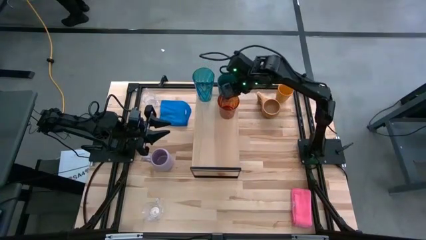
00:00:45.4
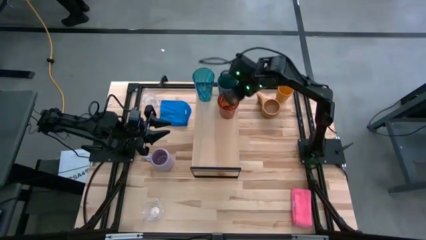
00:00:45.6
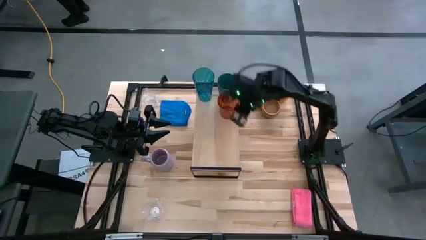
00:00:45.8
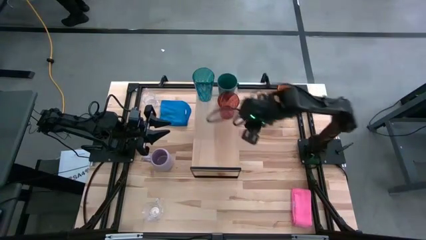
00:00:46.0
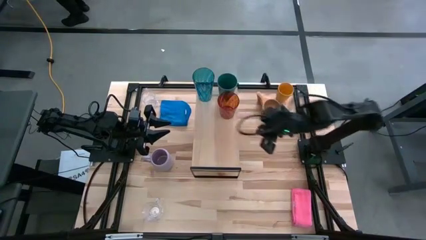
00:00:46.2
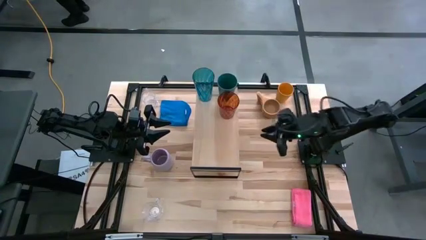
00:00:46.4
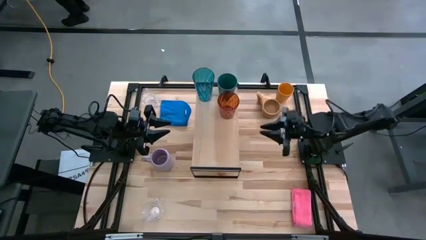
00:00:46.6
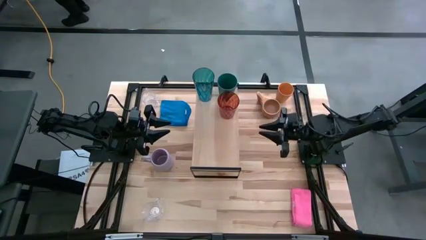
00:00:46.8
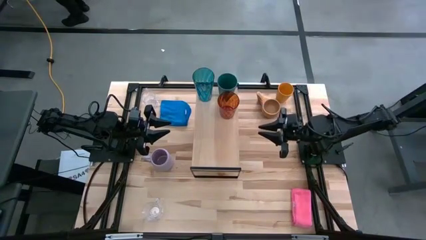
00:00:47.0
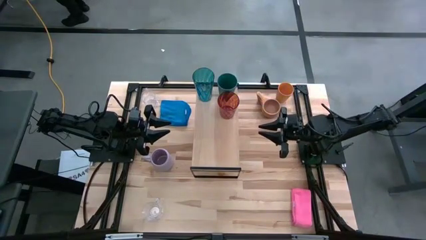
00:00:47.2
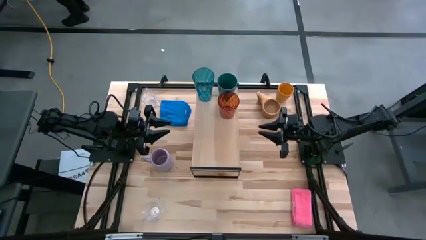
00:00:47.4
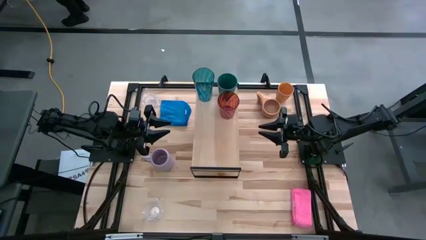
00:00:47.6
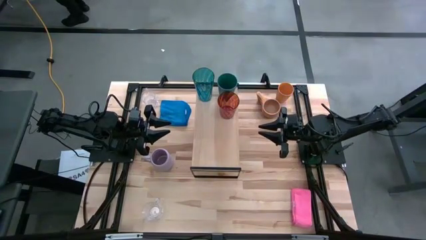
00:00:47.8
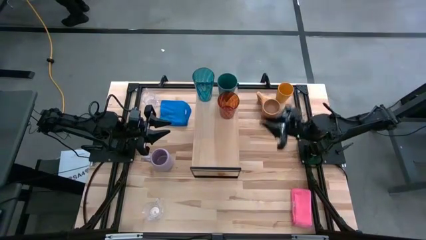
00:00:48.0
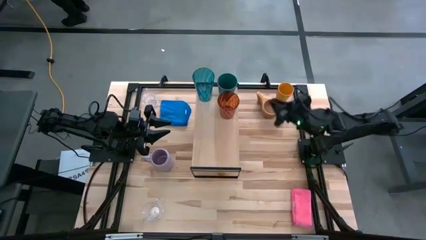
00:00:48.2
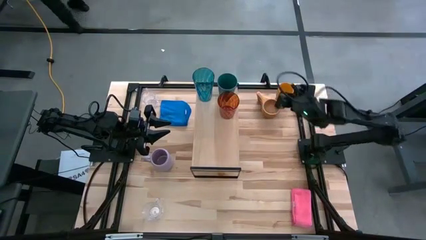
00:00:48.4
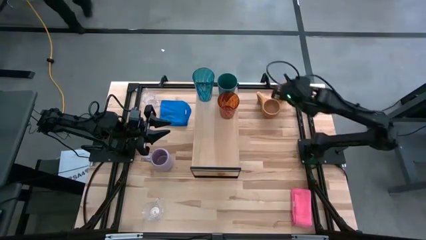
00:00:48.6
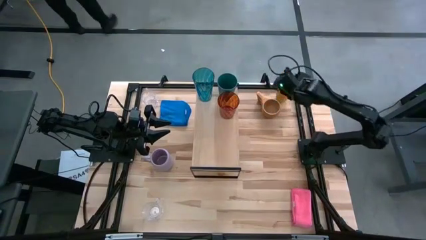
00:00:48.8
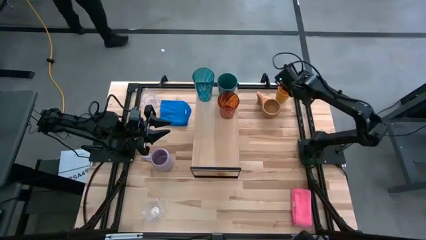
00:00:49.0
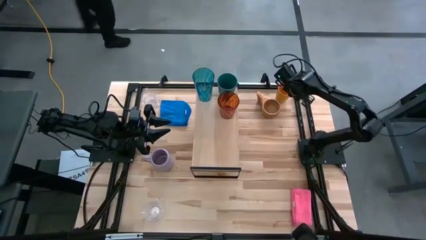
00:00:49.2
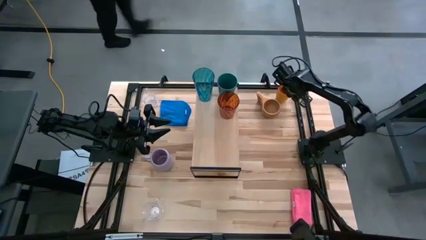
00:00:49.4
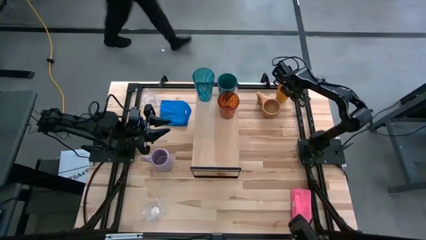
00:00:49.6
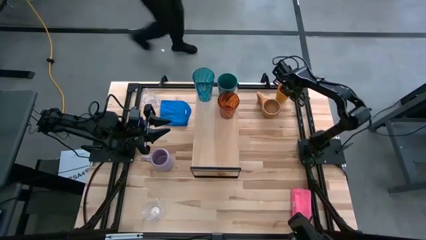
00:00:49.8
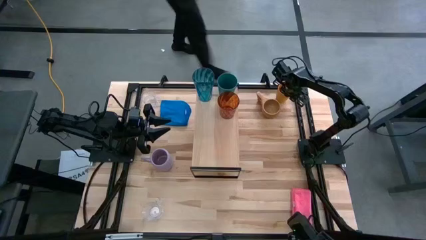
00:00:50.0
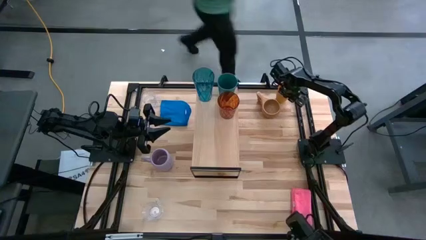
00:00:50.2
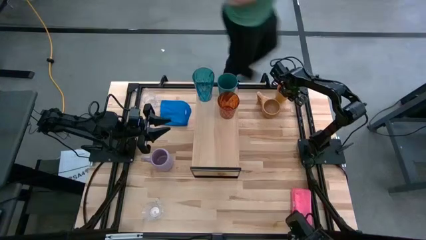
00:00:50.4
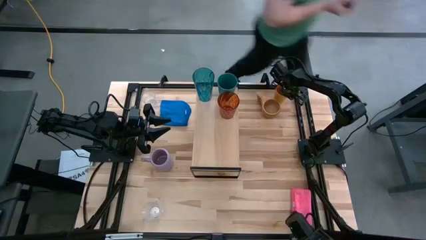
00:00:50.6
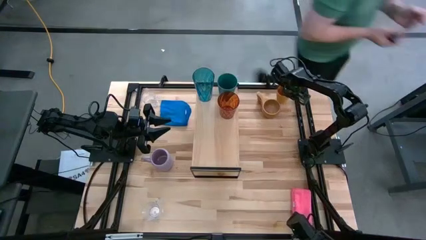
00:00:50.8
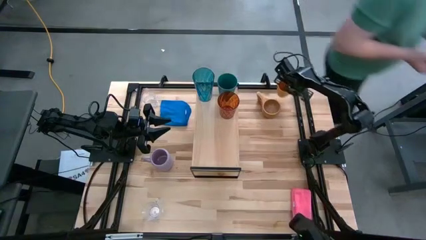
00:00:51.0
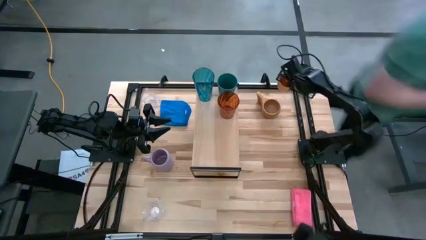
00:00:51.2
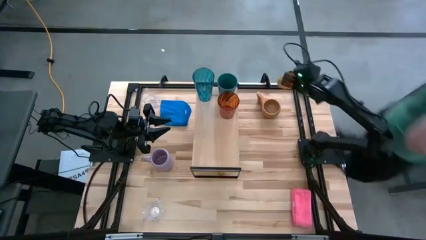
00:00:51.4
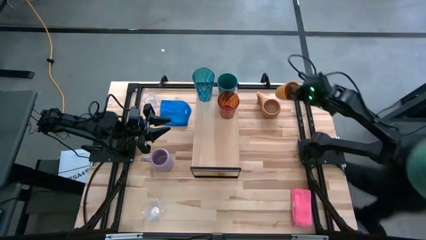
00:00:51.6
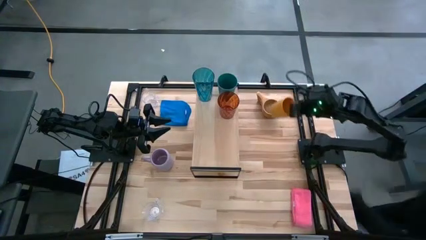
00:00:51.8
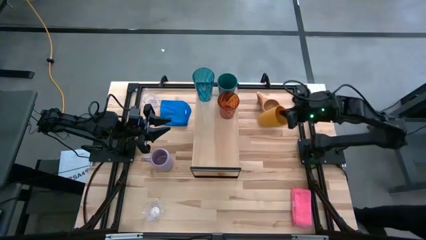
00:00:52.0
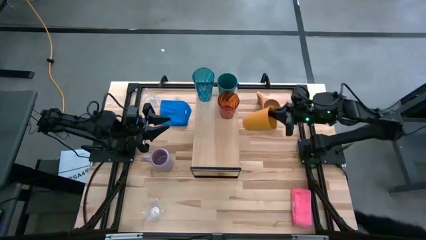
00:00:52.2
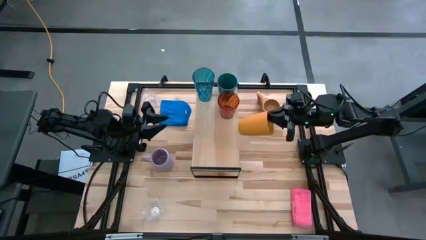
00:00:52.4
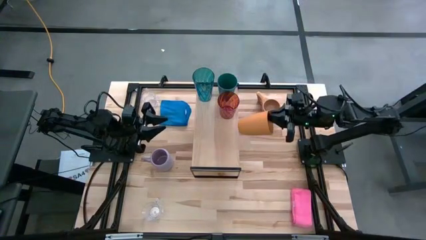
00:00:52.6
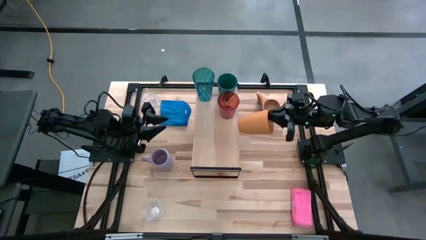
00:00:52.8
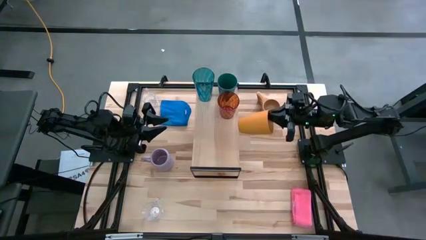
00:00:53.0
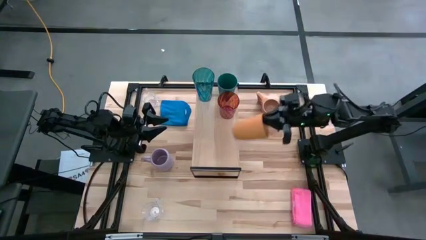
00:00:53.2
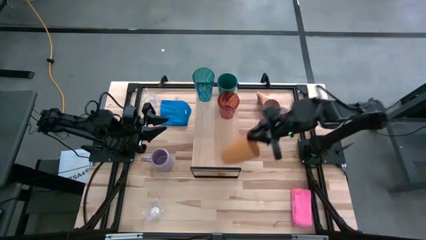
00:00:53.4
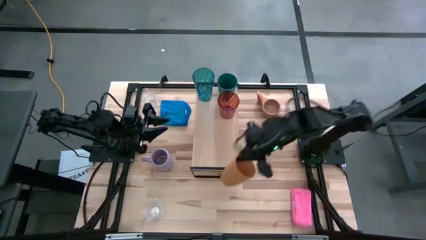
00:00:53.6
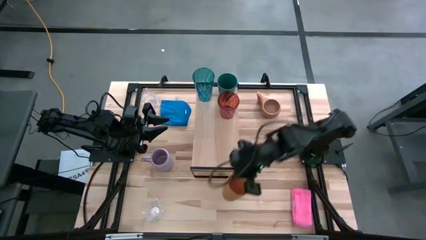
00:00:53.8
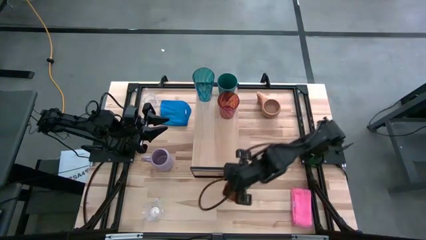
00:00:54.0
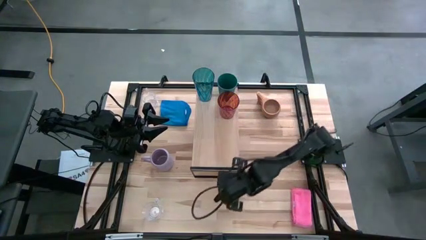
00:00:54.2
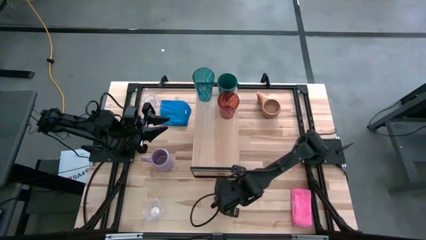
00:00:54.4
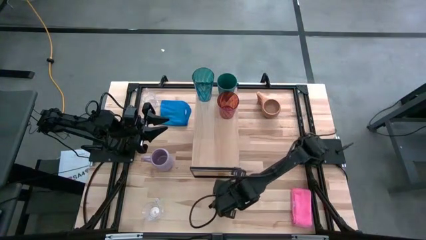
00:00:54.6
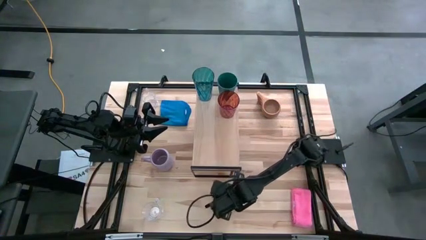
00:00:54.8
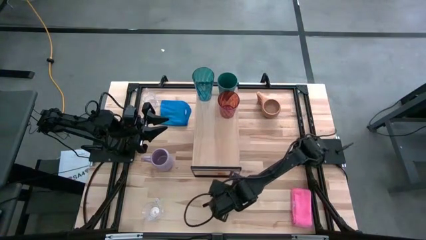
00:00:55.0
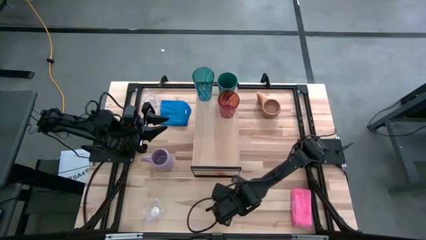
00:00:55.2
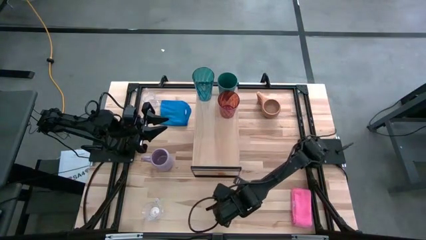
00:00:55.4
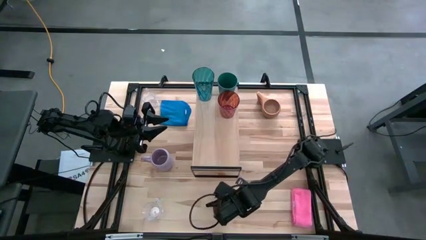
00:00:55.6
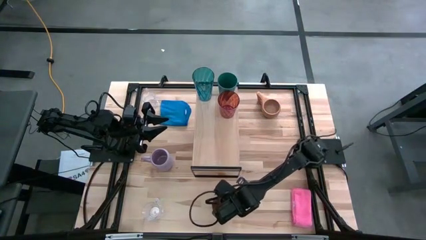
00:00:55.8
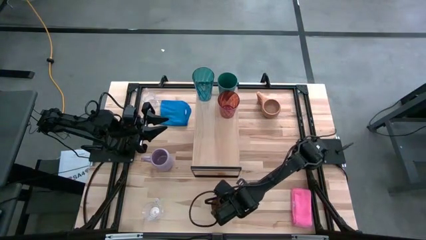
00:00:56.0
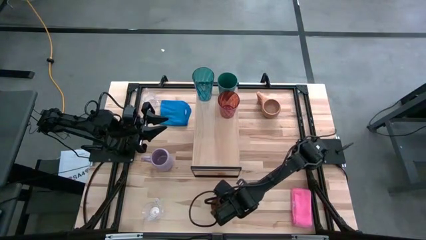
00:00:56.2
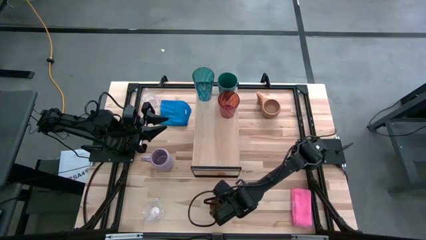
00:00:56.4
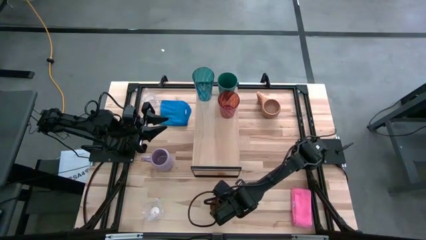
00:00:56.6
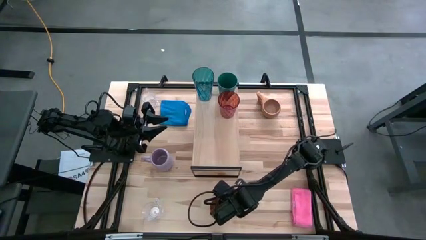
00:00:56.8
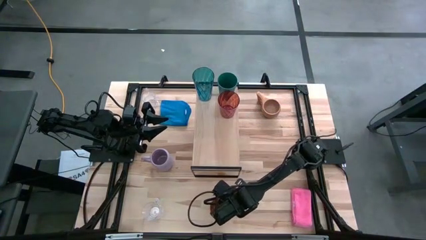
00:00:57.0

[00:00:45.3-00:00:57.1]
Task: Stack small to large cups/mugs on shelf
Put the yellow cup on the shelf

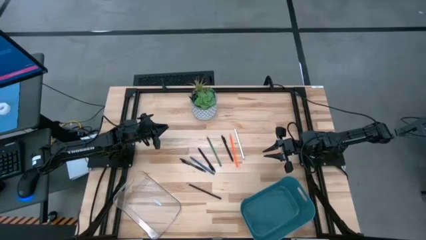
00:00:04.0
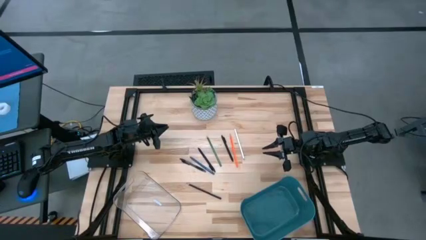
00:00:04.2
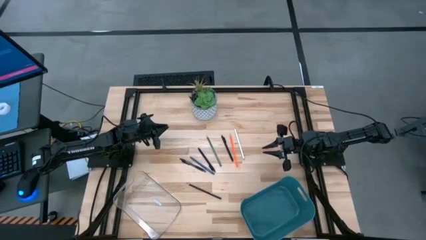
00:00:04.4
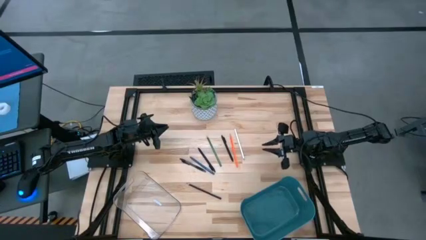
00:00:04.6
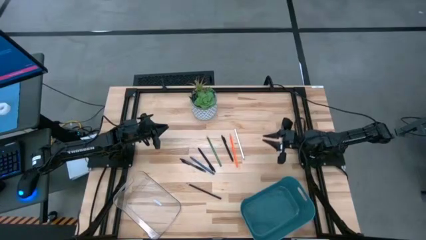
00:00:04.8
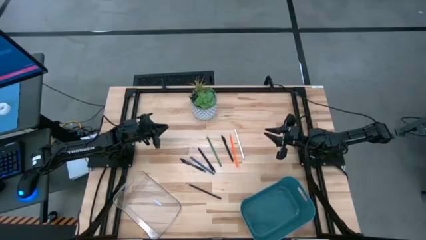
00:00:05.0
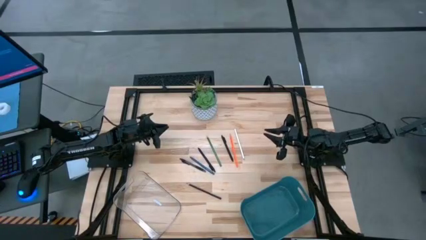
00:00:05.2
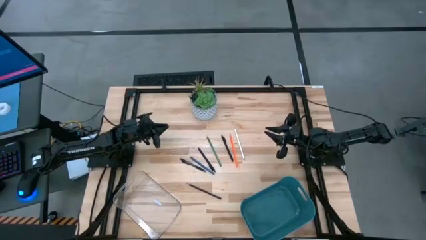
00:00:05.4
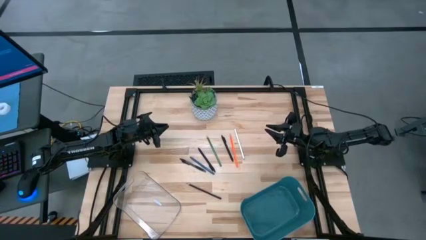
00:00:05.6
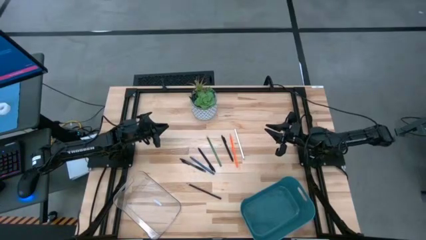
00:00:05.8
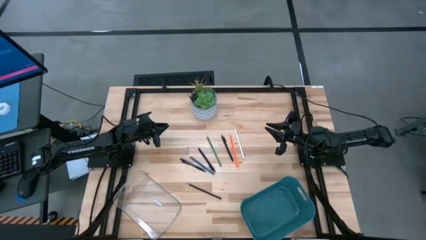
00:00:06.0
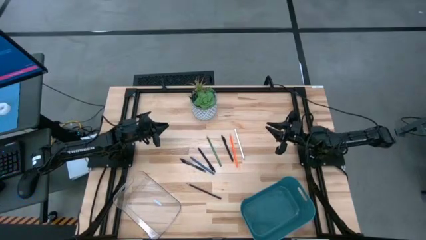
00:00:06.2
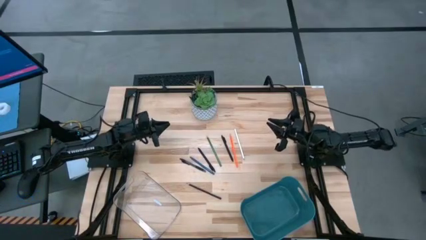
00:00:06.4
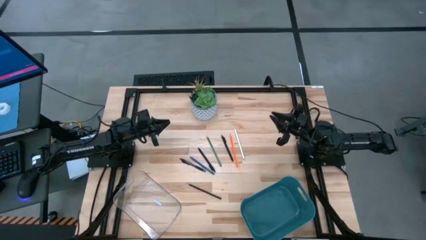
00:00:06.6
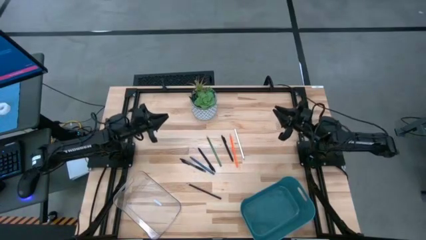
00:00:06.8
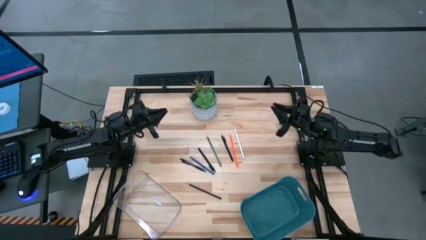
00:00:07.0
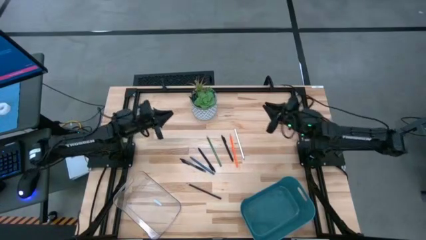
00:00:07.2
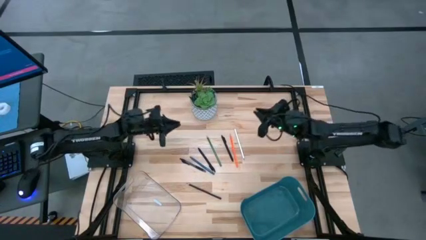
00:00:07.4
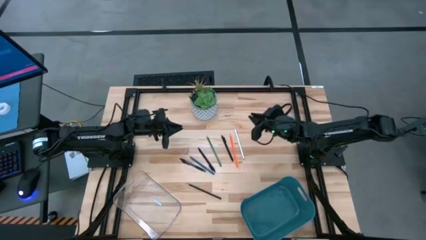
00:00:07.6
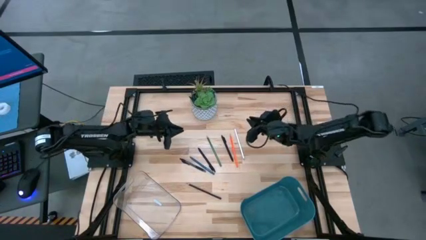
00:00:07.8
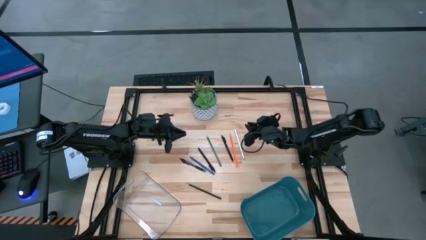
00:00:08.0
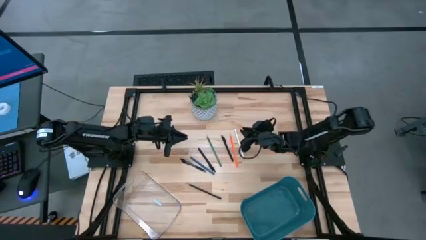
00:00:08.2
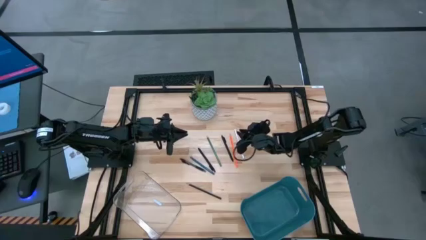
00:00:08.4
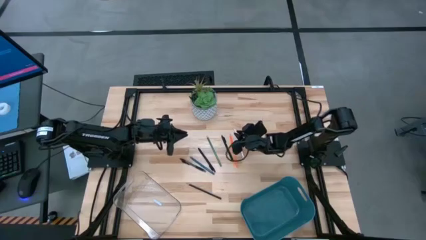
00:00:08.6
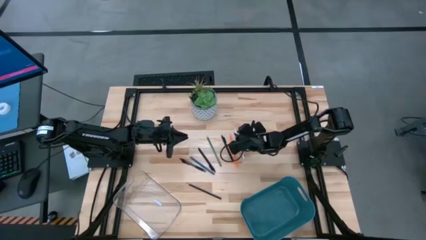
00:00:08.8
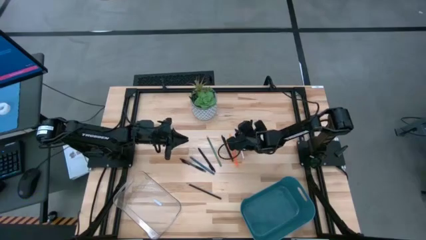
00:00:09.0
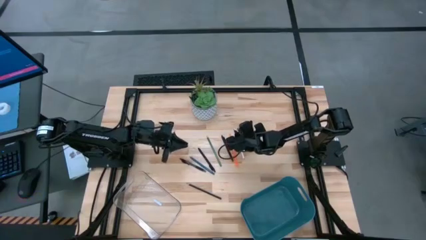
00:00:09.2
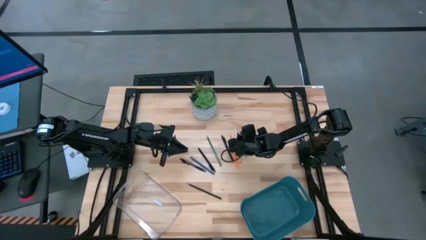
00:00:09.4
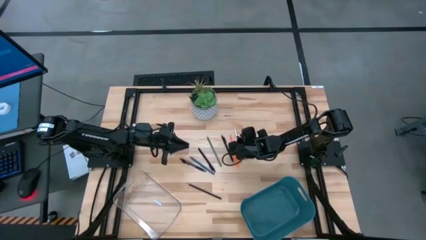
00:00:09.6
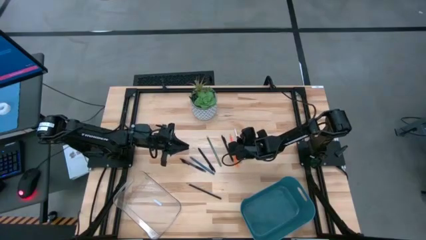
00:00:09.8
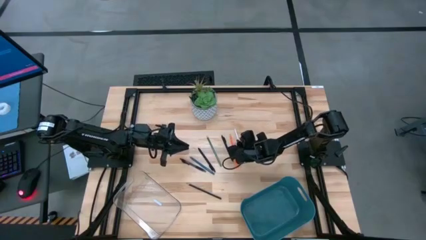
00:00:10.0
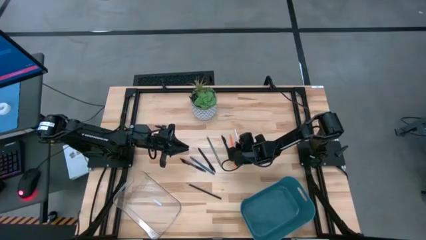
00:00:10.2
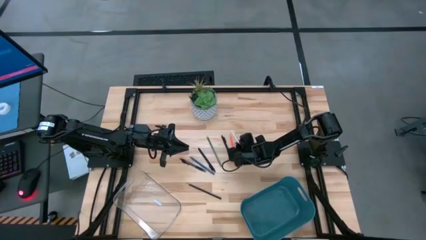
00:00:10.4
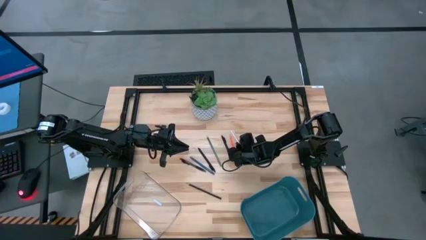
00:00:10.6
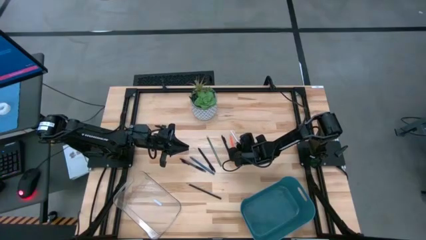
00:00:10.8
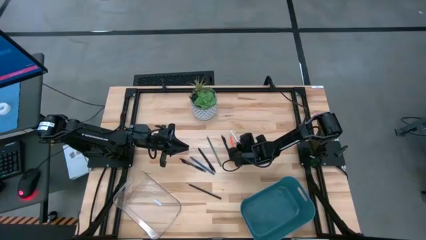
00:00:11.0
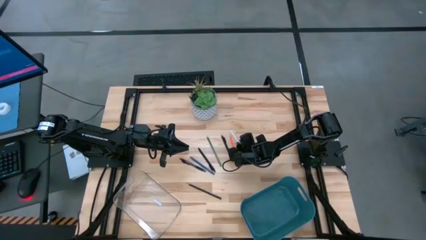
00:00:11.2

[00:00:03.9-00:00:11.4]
Task: Sort pens & pencils
Put the white pencil into the blue bin
